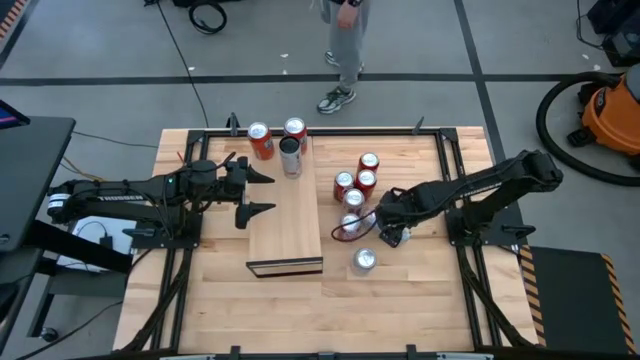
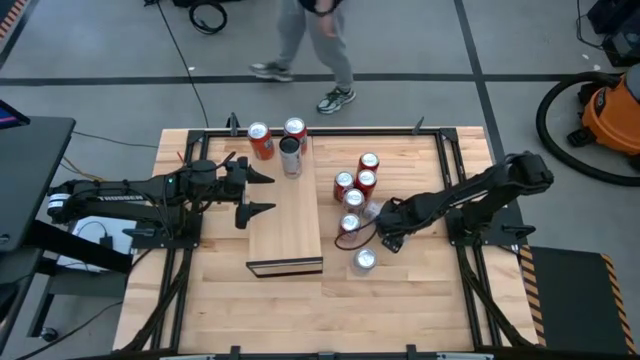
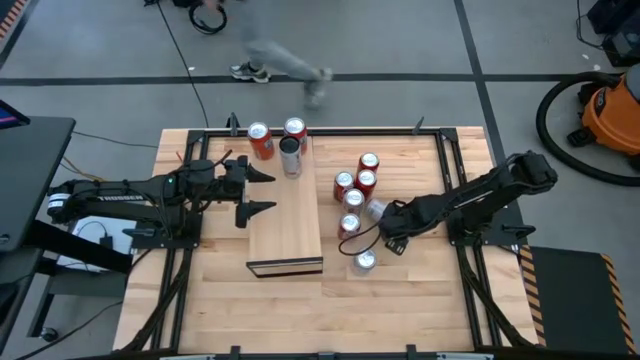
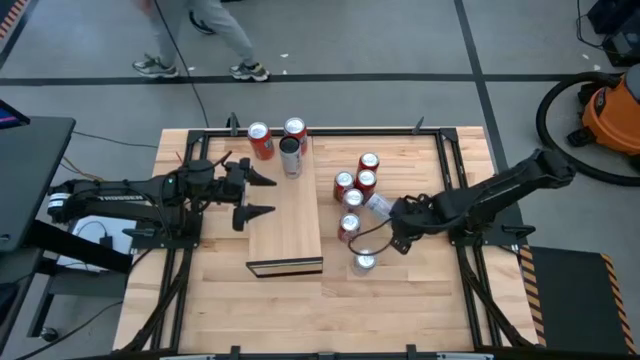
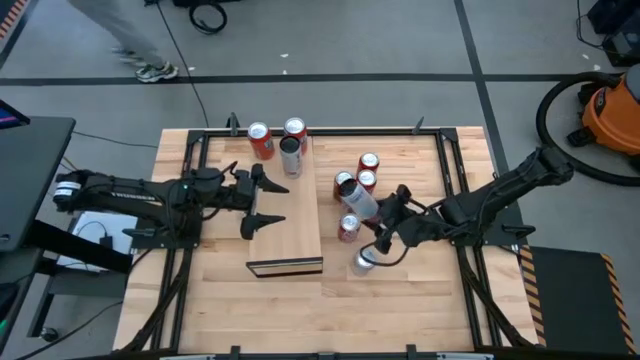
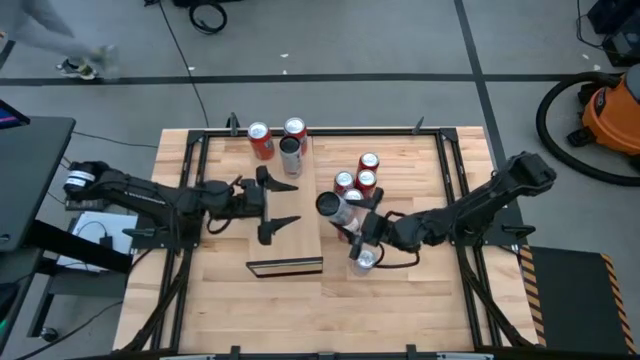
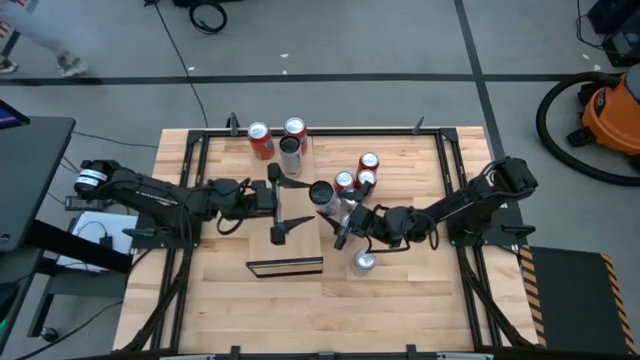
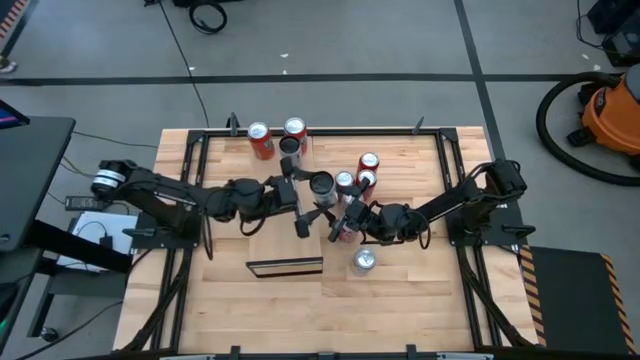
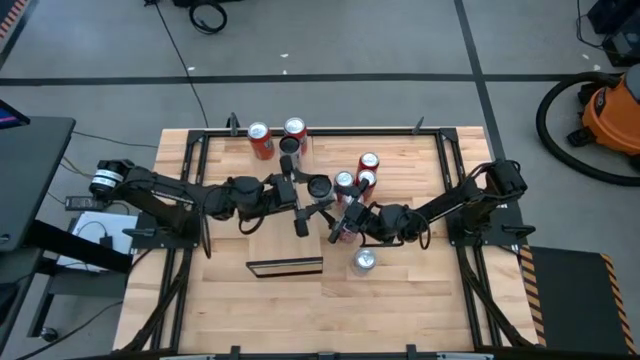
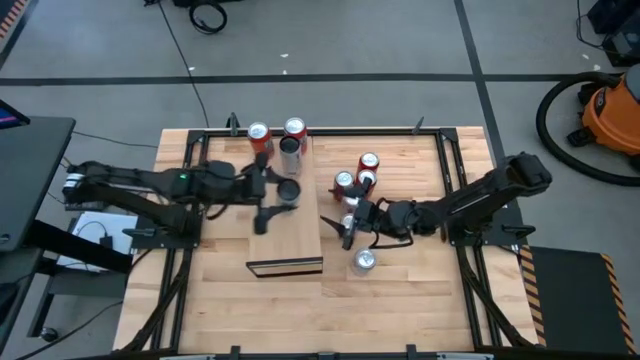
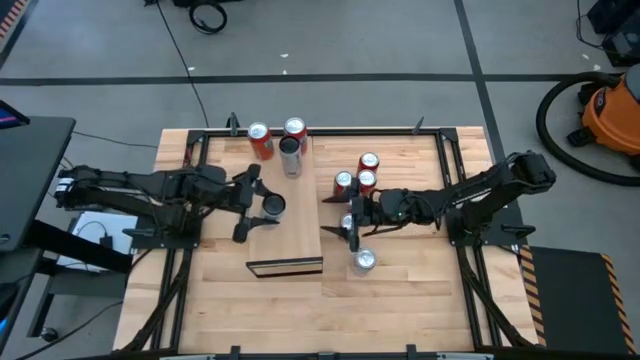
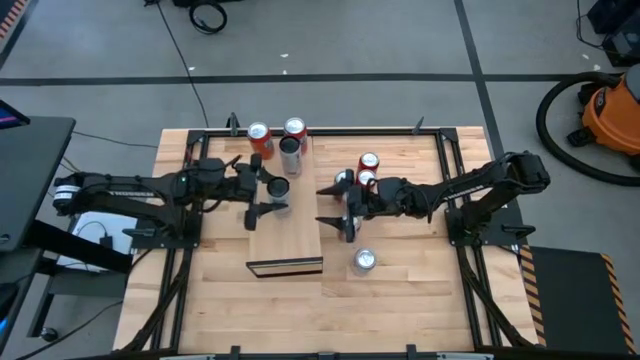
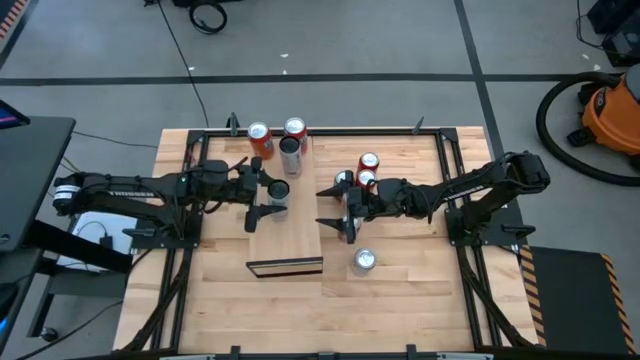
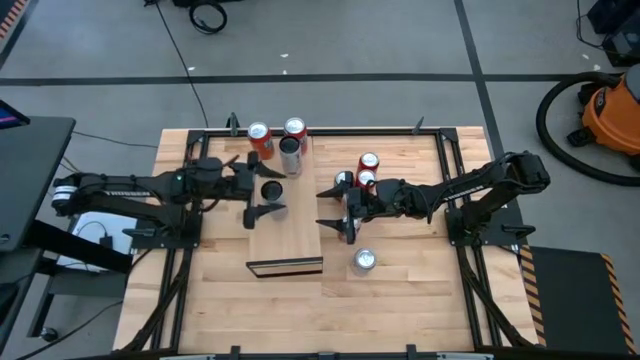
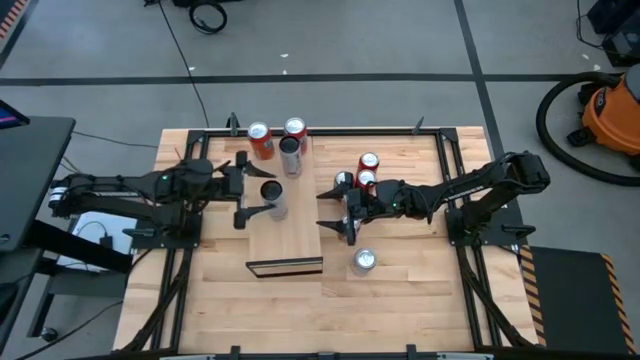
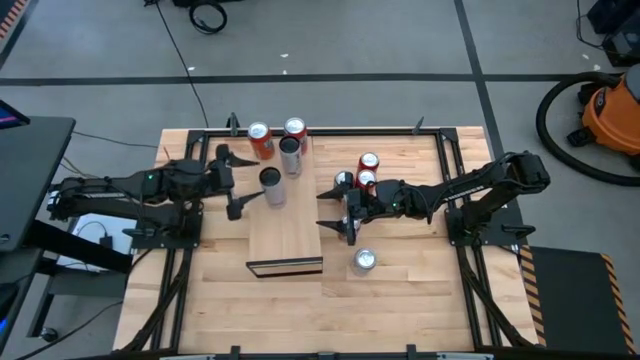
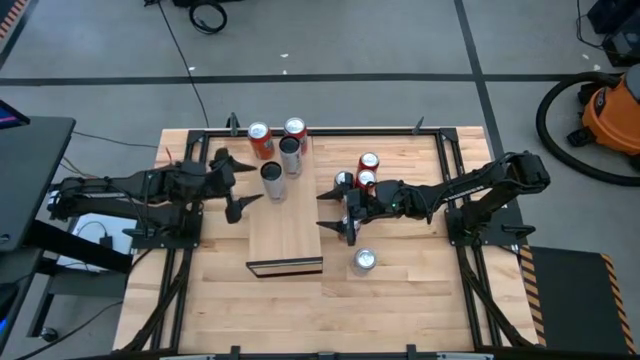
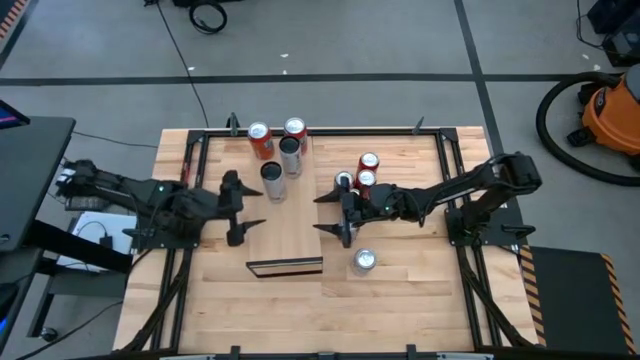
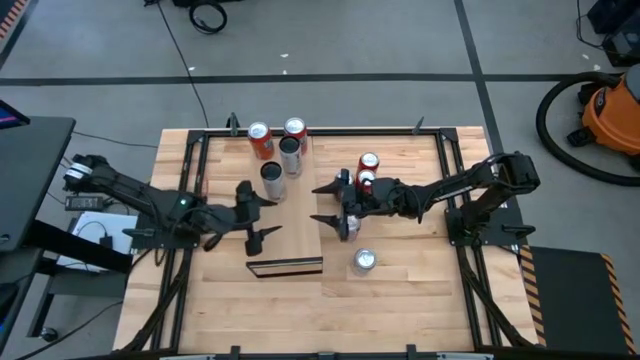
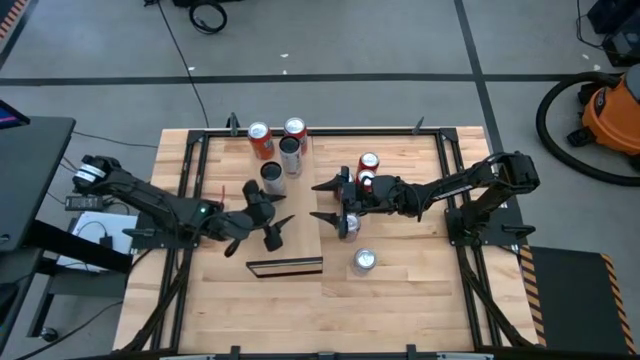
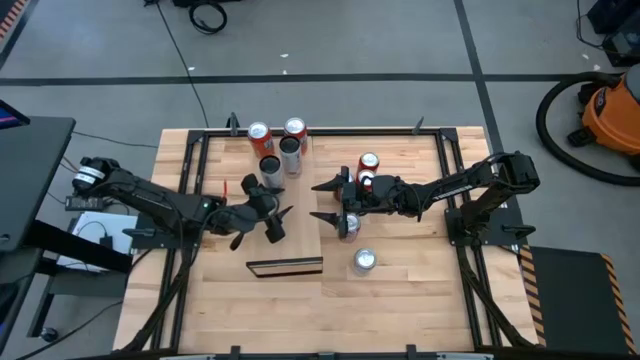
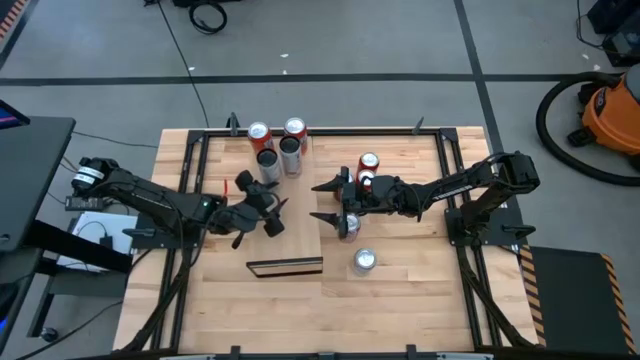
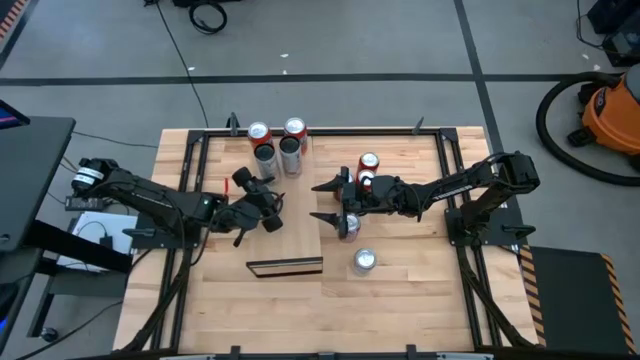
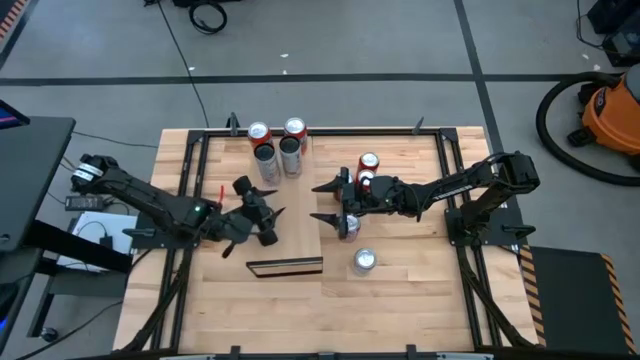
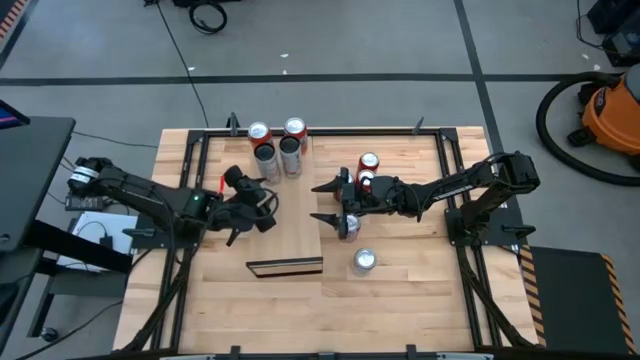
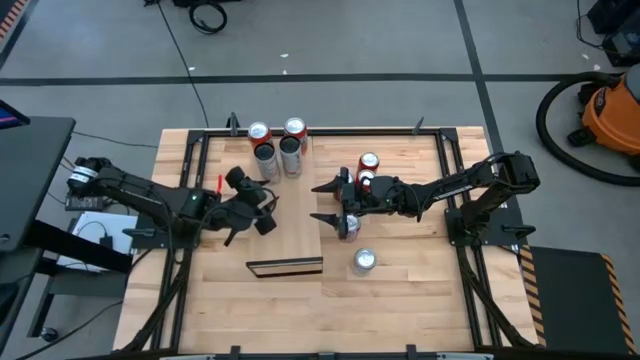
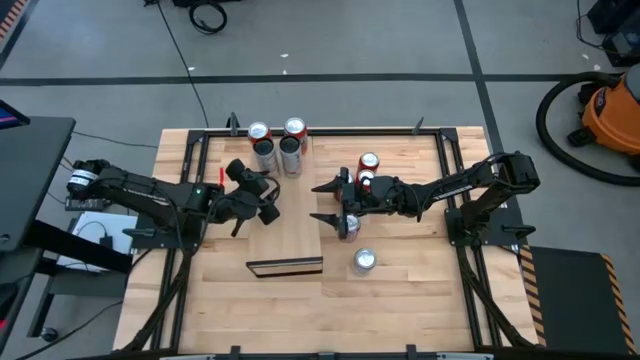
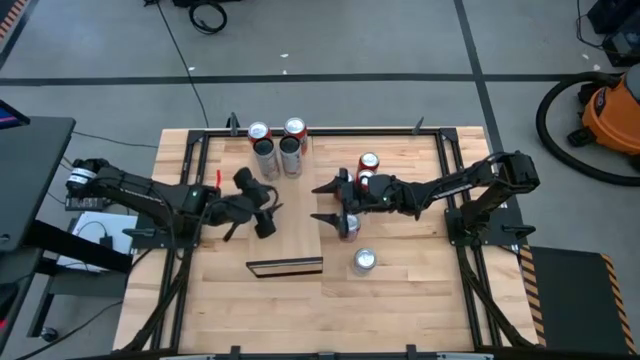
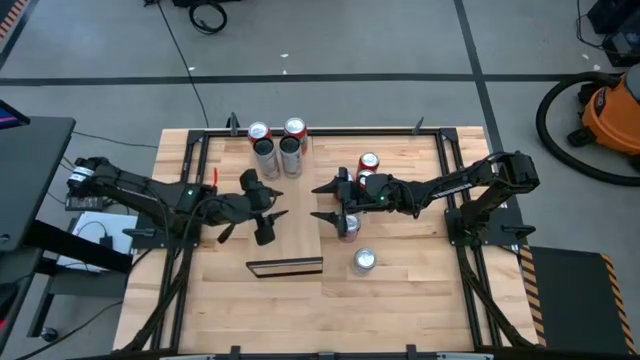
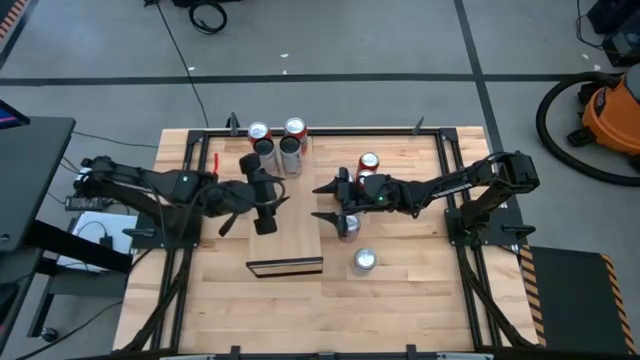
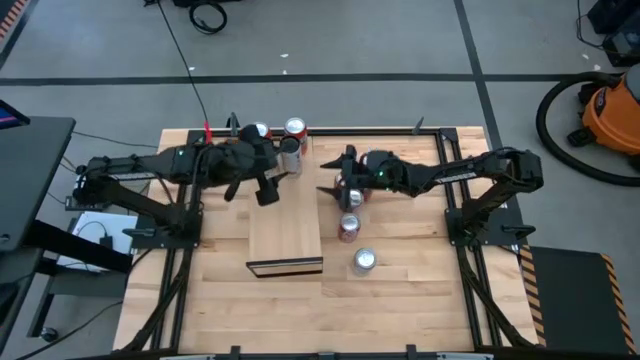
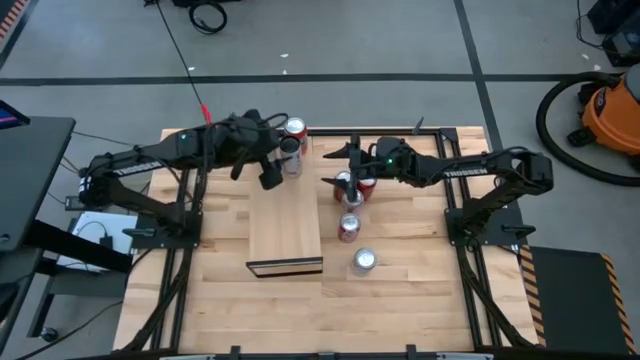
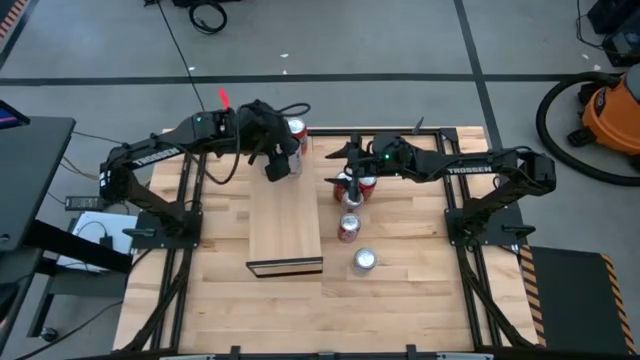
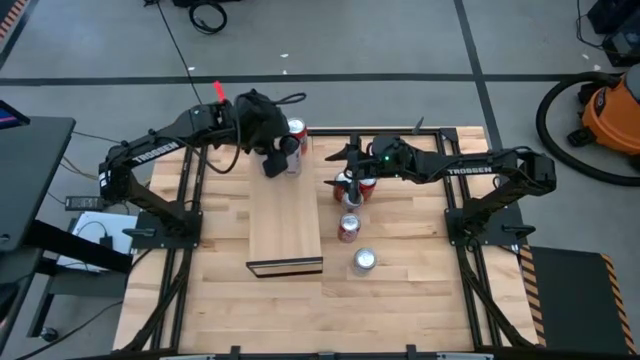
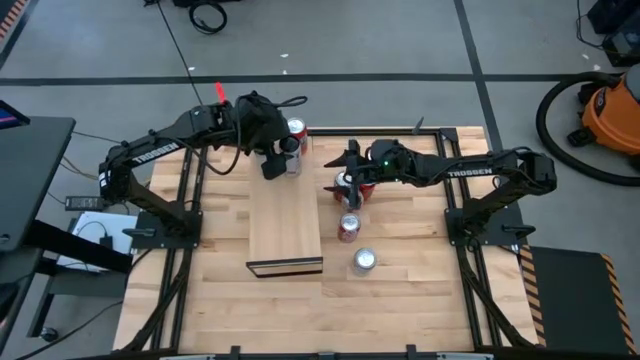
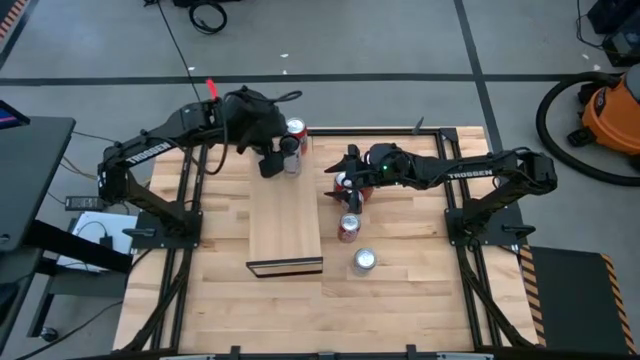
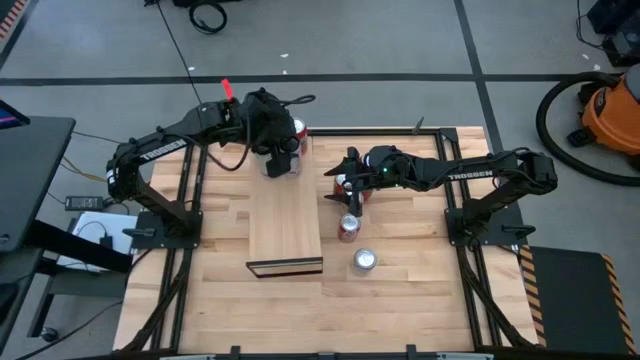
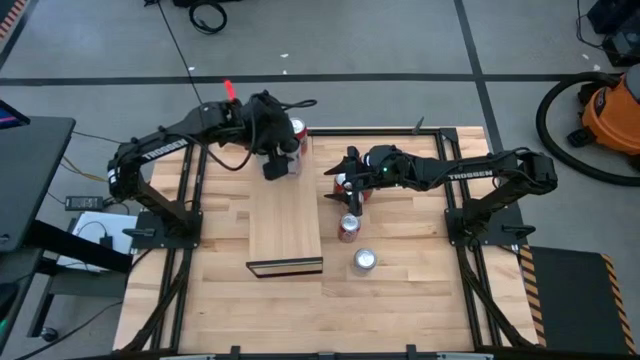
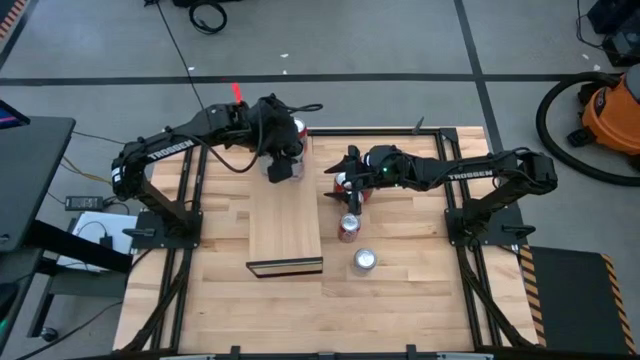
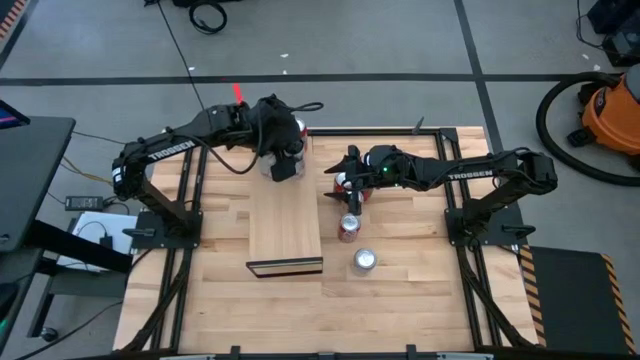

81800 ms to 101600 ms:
Task: Place canned beverage on shelf
Put the white-pink soda can on the shelf and align it with the other white-pink soda can

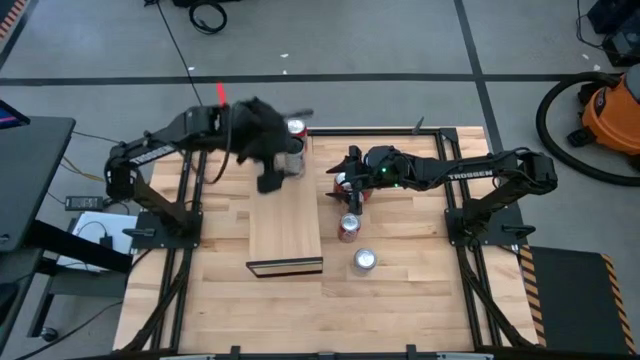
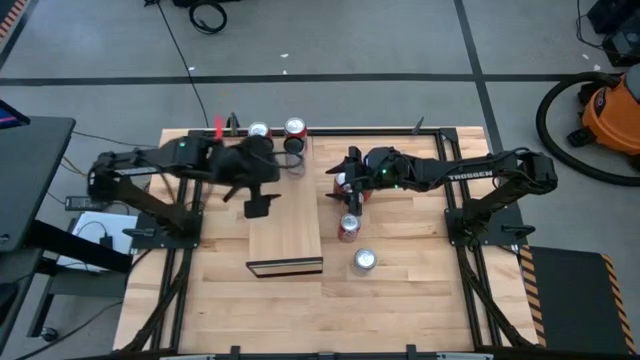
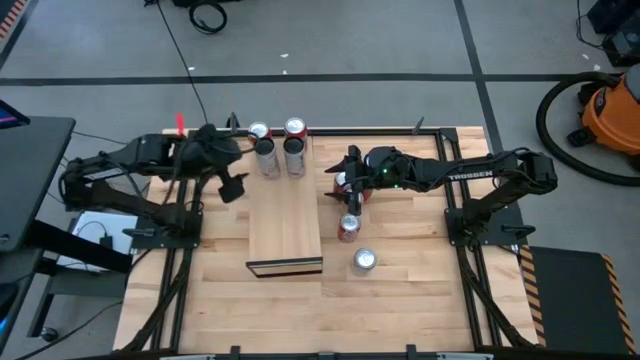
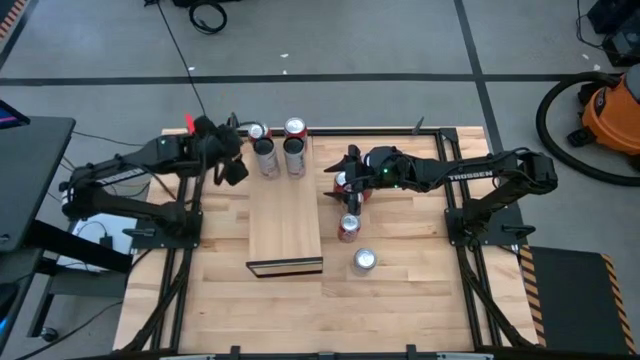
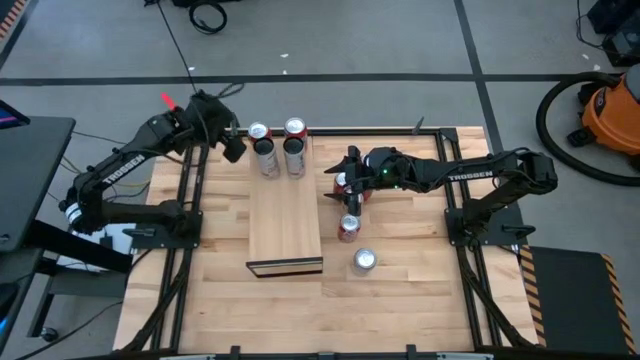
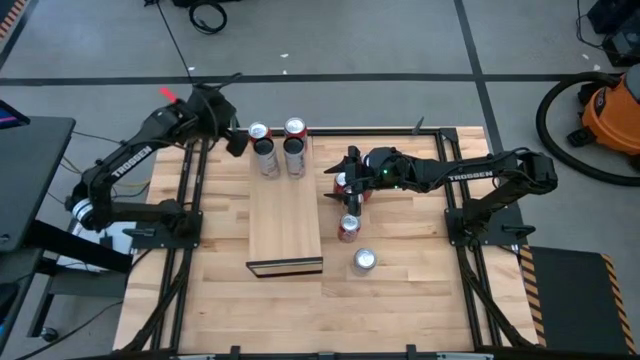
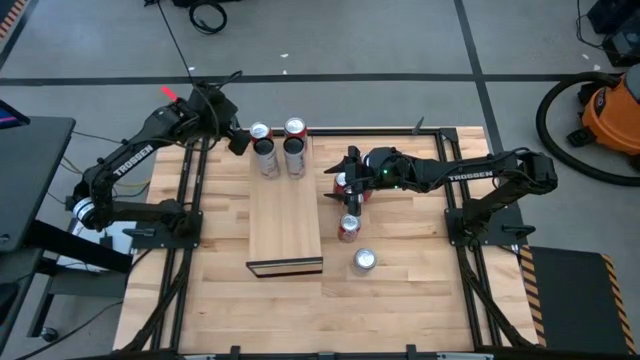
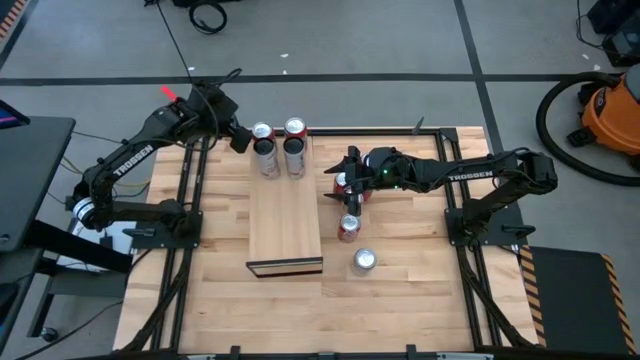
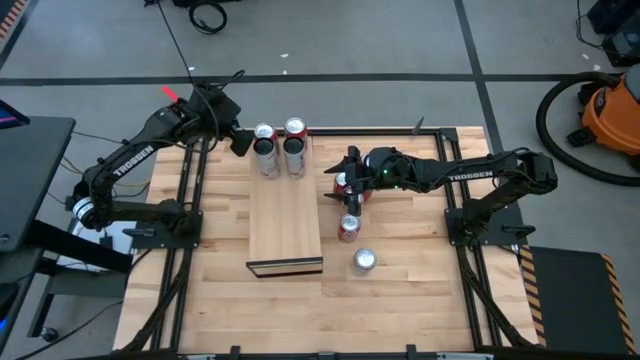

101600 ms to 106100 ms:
Adjust the orange soda can on the shelf
